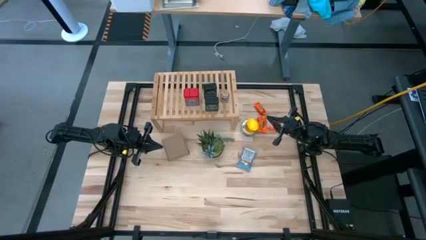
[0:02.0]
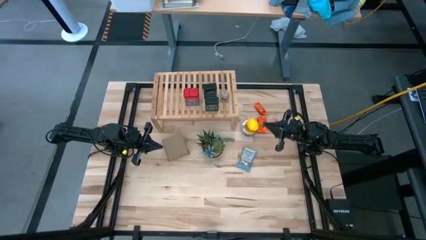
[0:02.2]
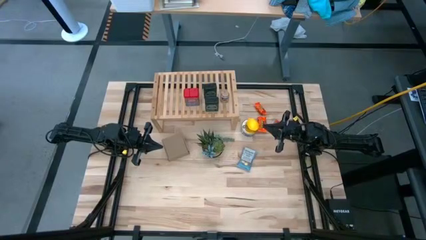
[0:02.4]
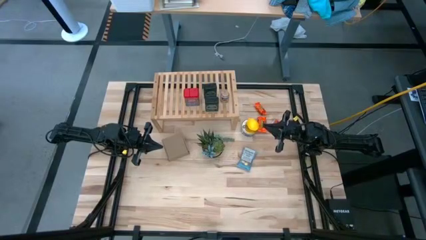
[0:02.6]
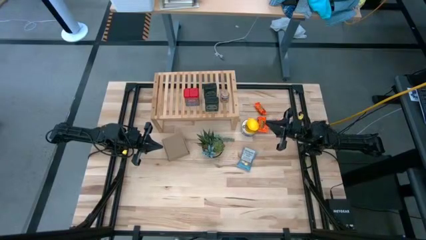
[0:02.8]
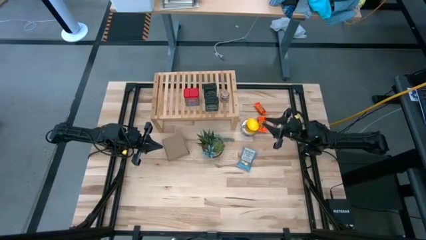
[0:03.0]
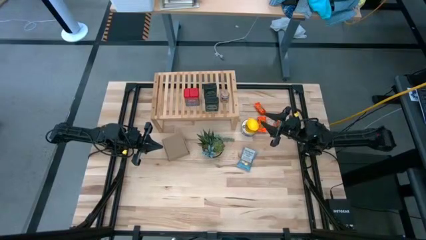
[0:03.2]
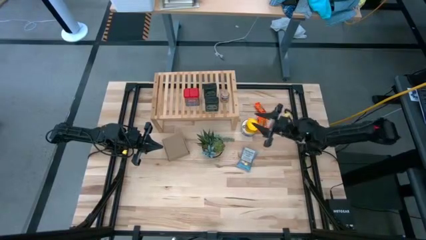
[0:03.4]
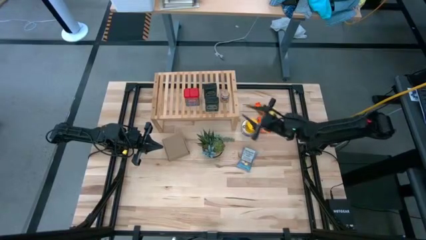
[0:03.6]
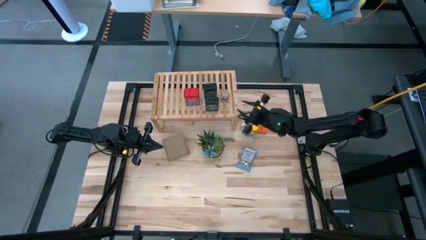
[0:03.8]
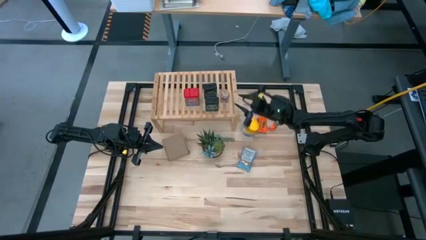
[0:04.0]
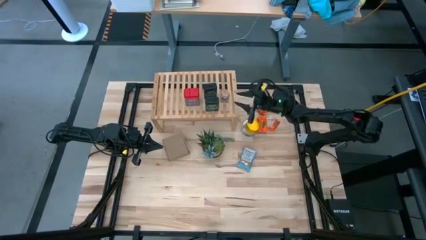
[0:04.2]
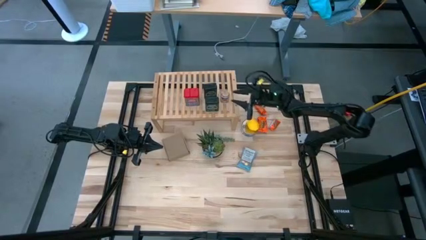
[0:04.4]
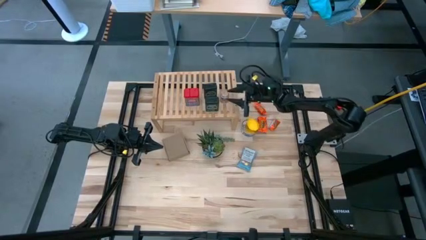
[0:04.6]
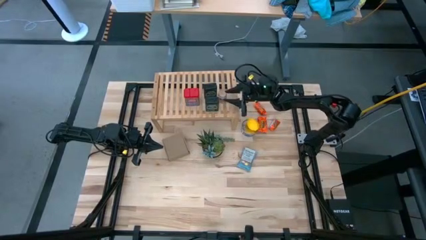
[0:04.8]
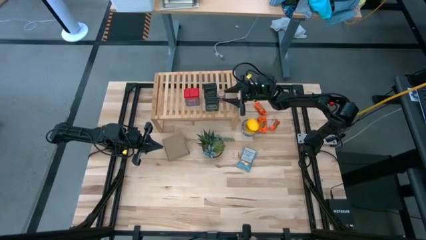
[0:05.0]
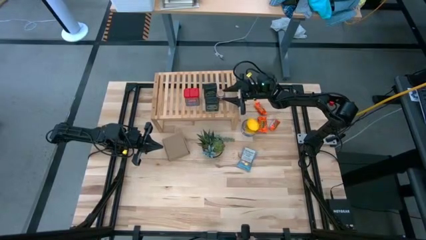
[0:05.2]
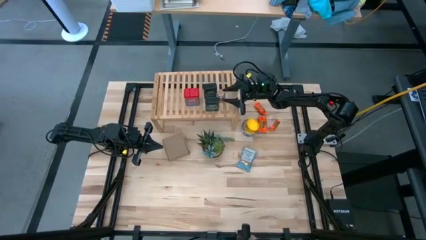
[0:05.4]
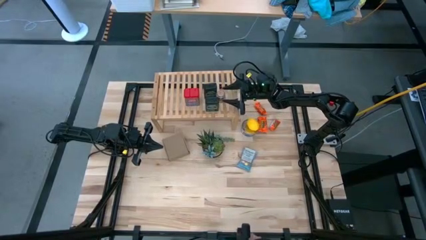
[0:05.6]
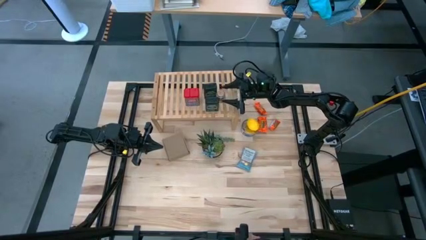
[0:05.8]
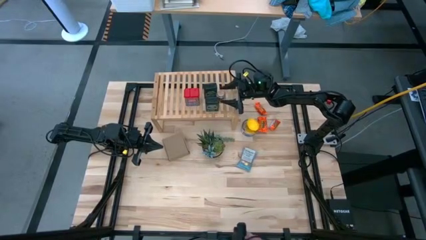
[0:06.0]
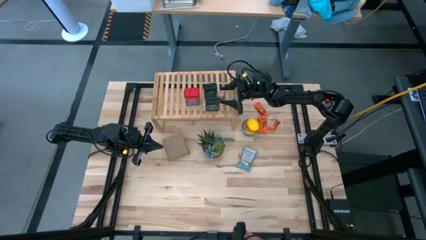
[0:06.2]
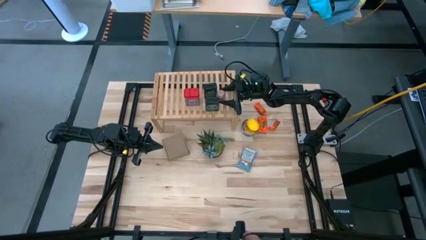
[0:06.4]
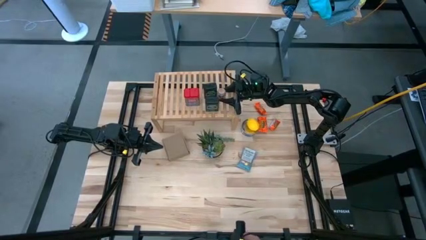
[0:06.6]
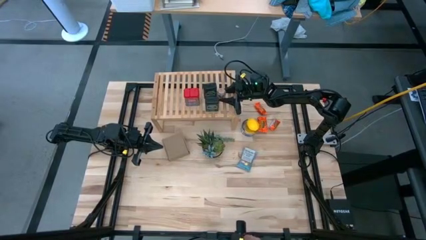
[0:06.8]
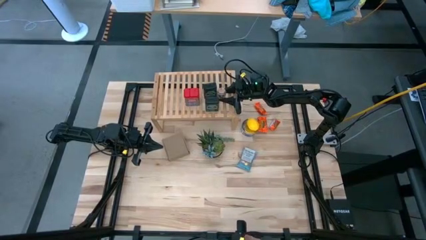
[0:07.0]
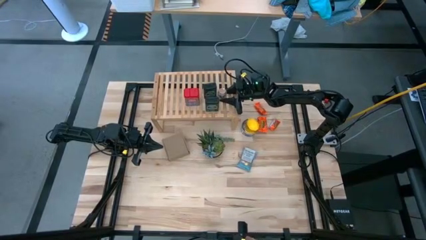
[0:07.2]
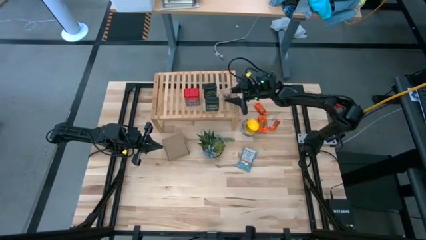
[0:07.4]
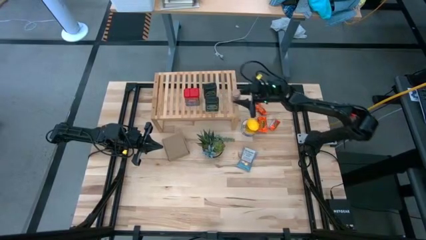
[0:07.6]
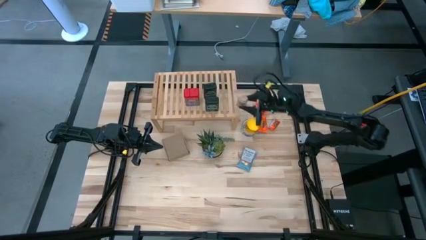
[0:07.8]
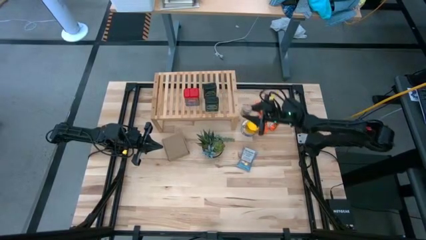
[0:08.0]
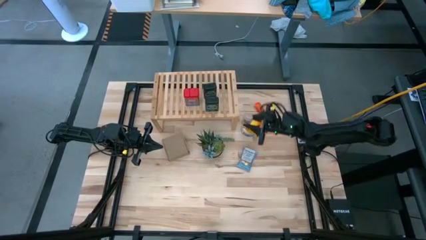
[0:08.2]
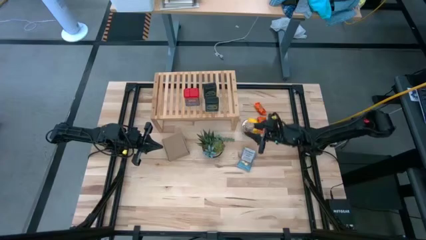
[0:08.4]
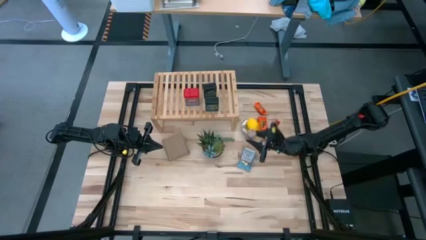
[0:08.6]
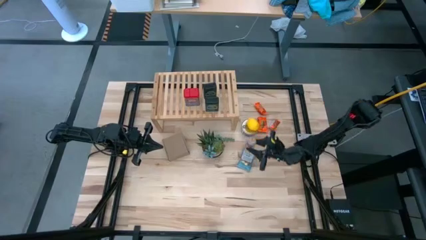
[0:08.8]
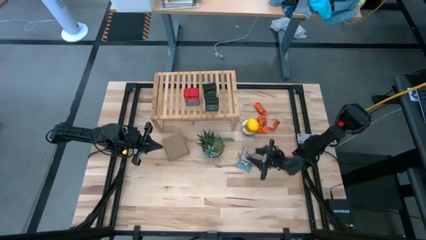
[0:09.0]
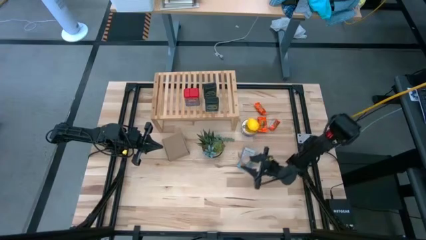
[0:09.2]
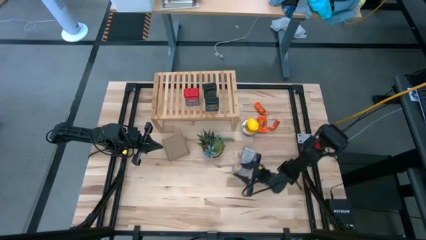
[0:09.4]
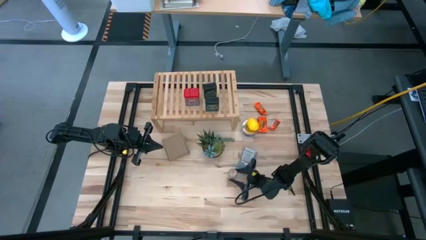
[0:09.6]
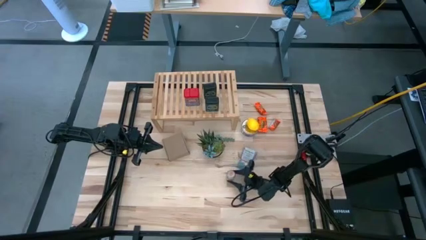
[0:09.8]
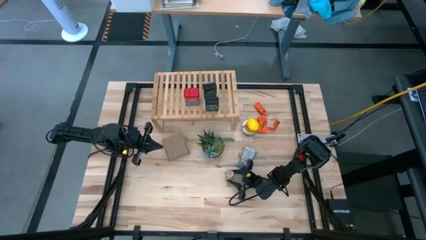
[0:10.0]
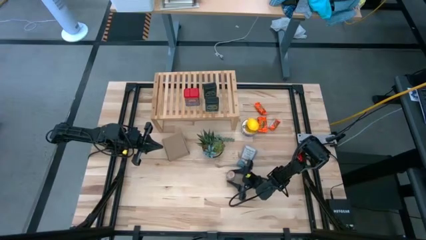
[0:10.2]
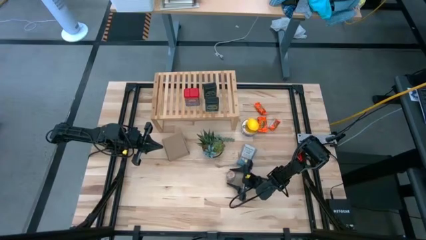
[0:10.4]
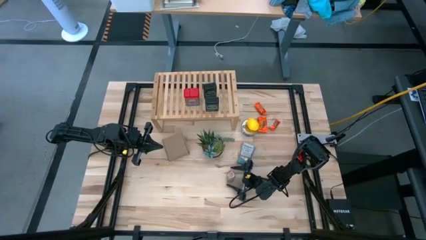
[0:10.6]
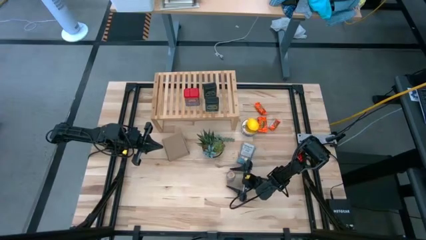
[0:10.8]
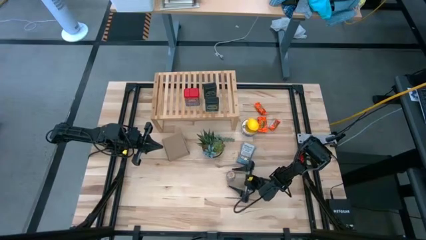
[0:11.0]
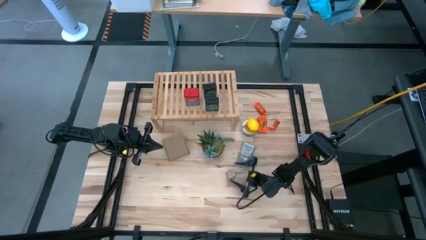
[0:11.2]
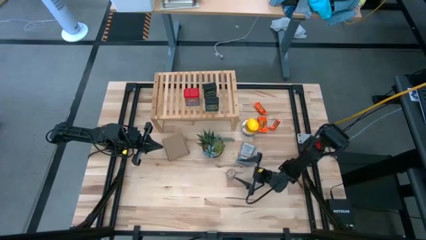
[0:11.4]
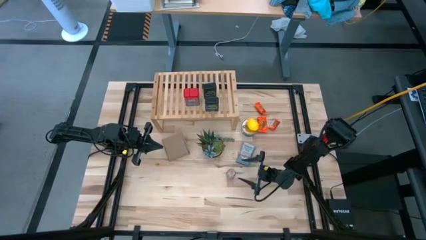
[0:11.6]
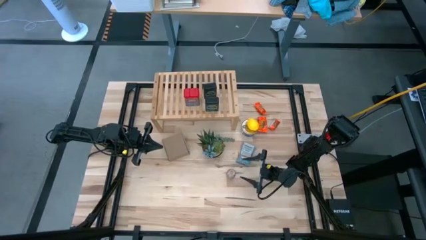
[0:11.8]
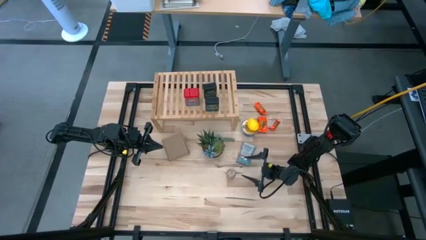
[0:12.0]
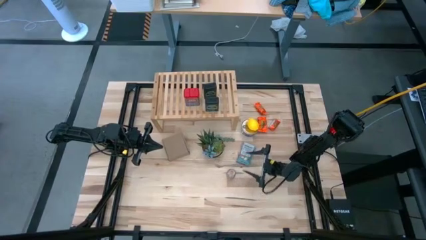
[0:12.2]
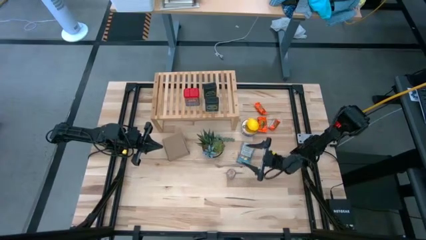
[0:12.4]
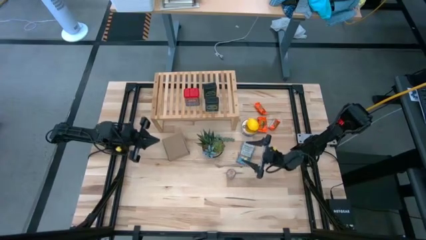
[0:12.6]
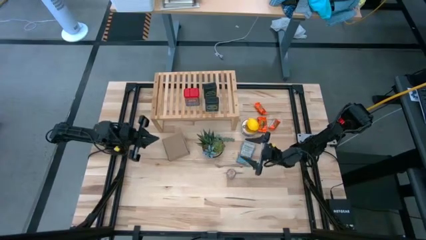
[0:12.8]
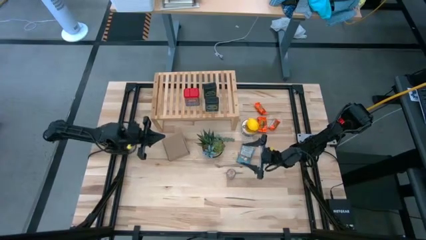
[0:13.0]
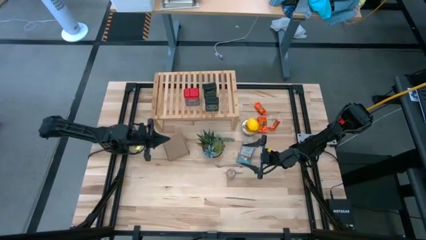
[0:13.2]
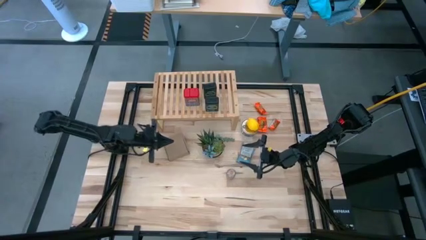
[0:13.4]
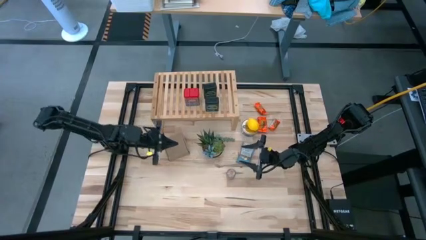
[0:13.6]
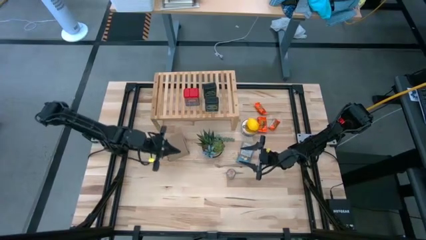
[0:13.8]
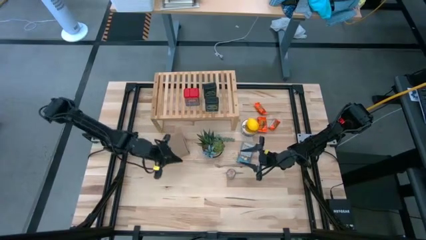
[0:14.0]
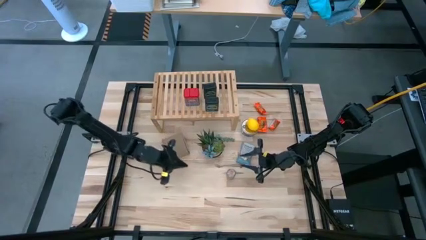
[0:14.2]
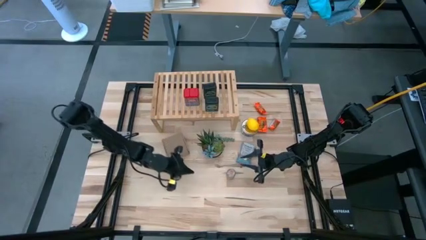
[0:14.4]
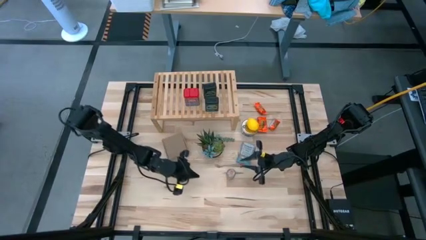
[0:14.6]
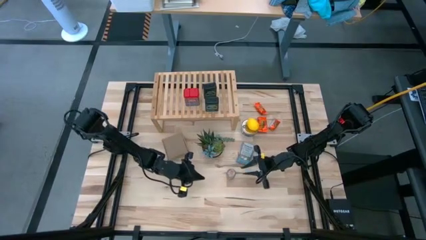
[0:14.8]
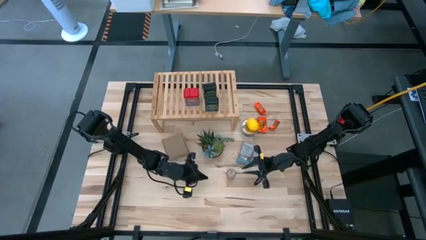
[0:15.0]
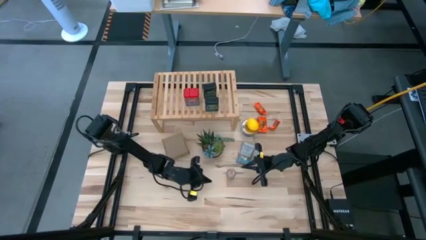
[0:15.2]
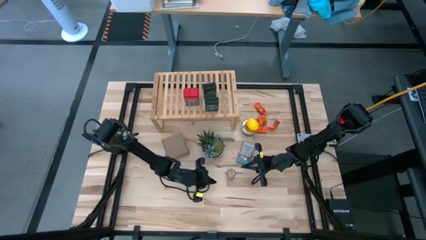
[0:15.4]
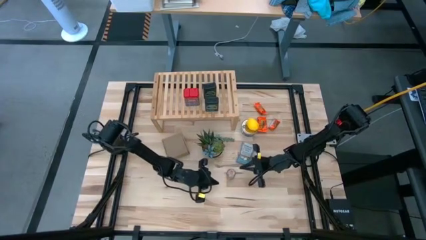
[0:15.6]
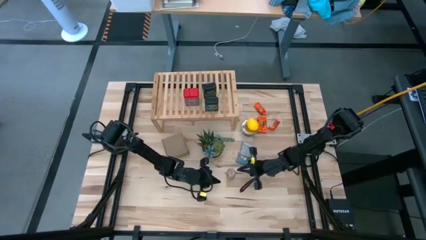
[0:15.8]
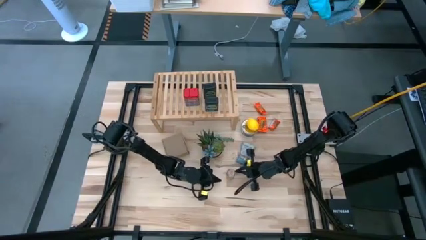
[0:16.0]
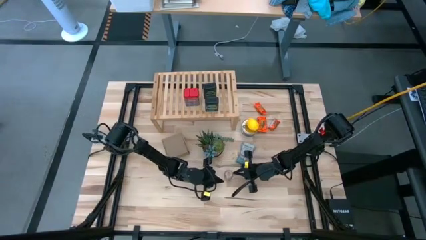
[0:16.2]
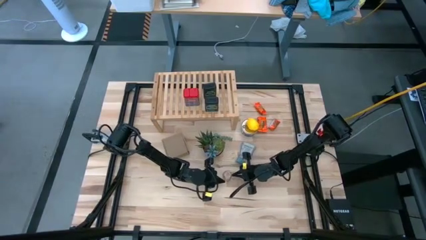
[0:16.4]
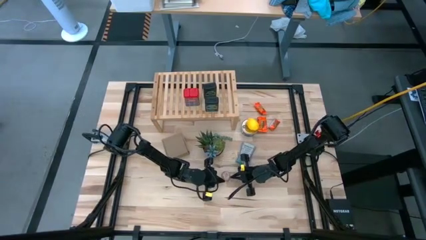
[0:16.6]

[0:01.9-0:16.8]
Task: Shelf spices
Remove the brown seasoning bottle from the shelf
